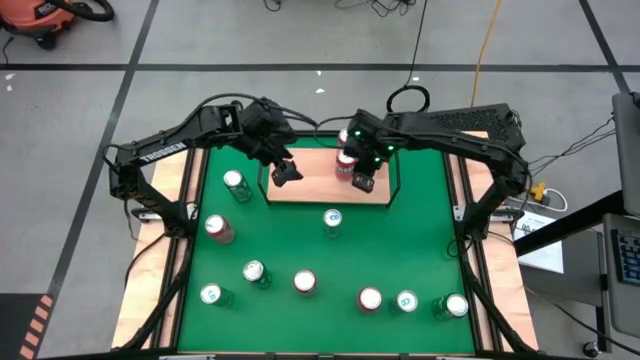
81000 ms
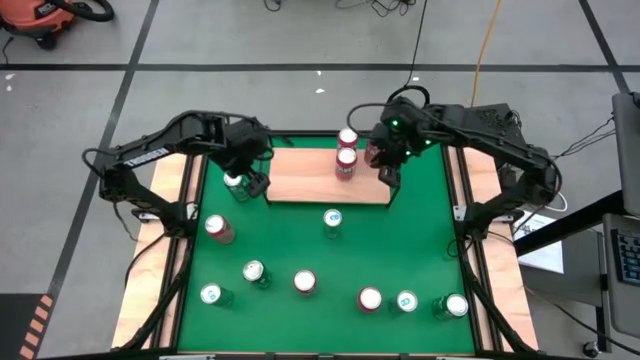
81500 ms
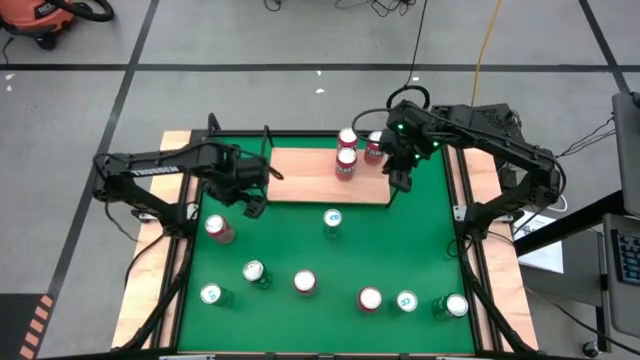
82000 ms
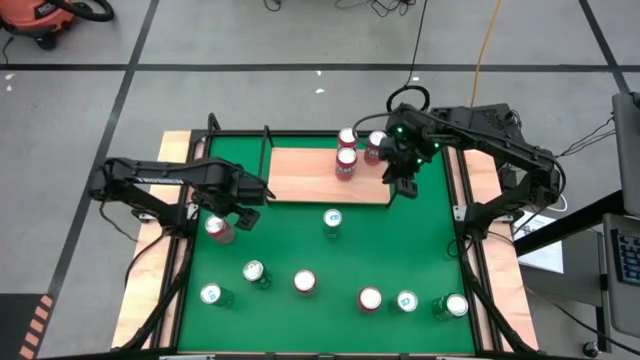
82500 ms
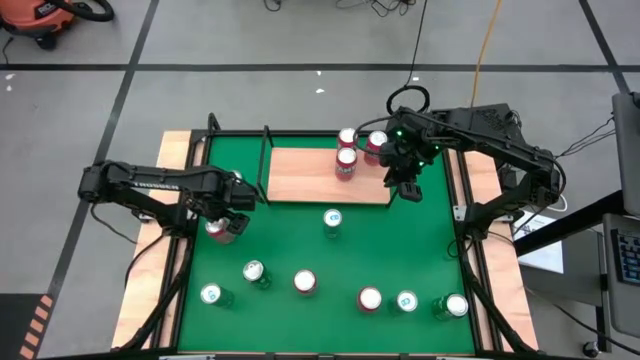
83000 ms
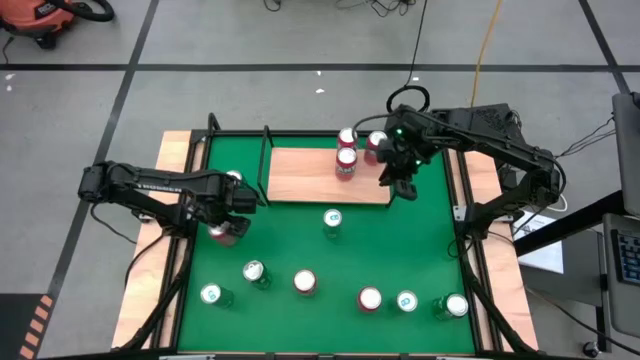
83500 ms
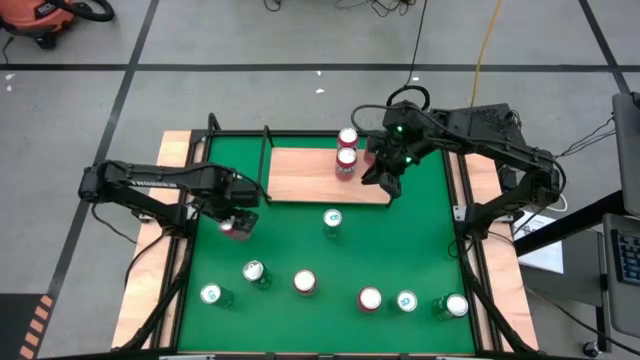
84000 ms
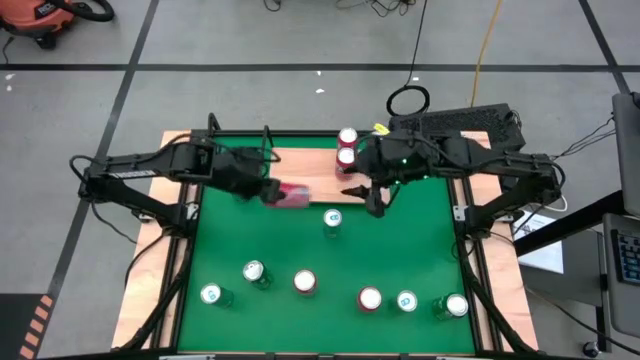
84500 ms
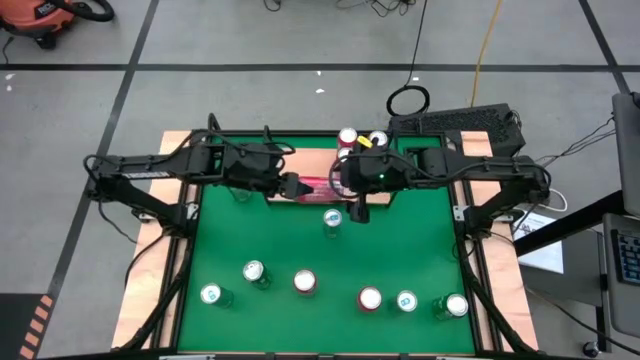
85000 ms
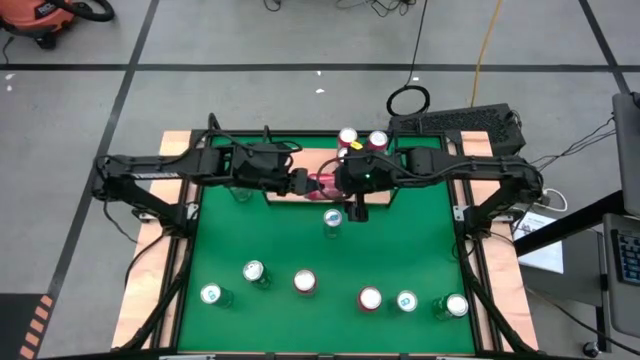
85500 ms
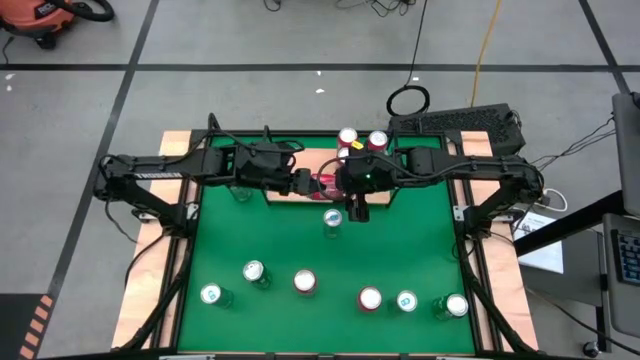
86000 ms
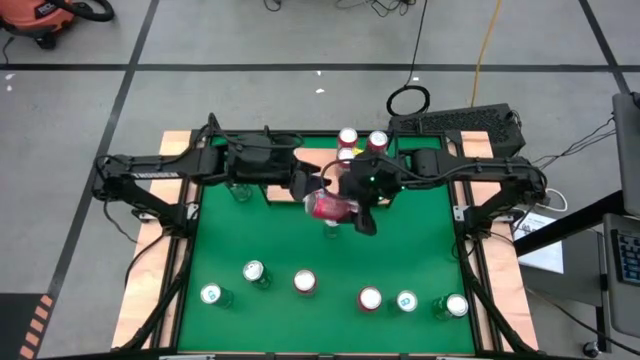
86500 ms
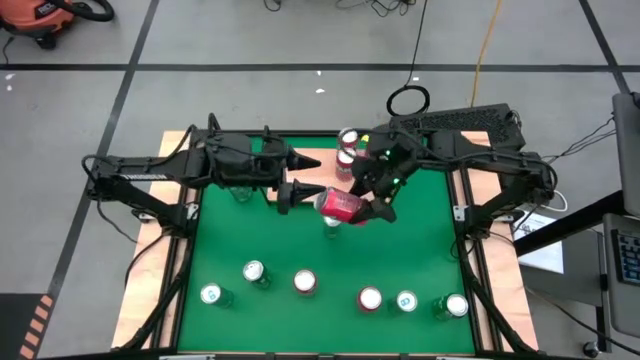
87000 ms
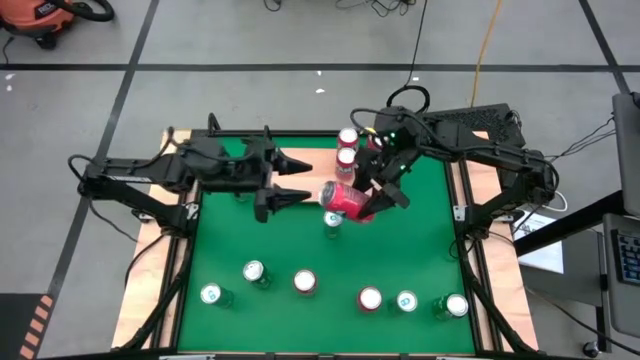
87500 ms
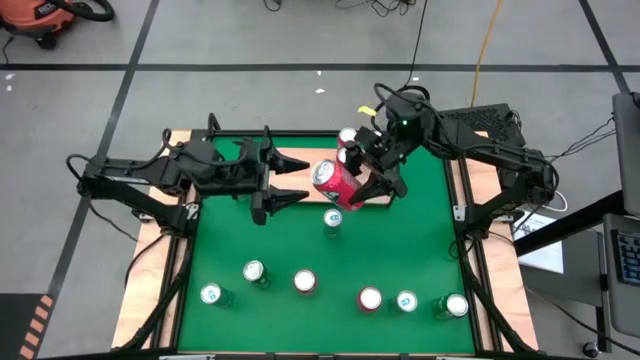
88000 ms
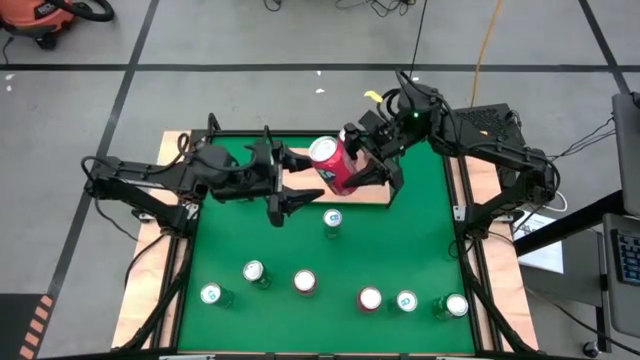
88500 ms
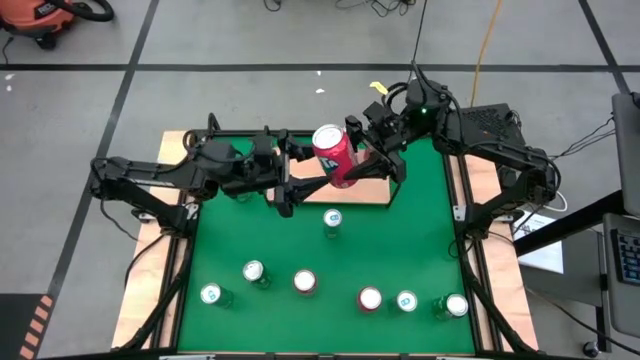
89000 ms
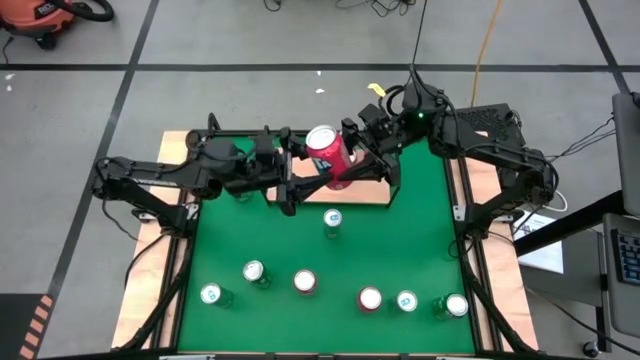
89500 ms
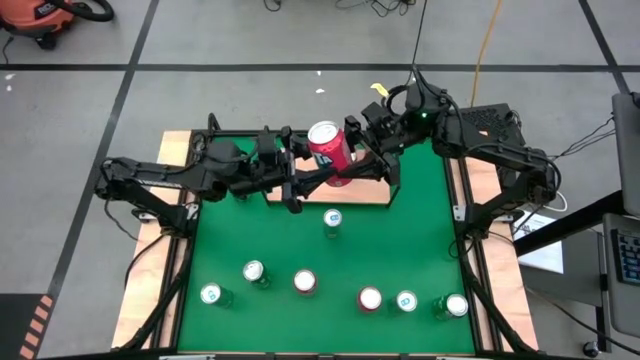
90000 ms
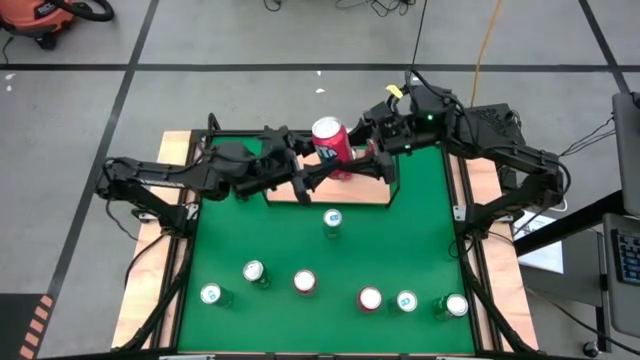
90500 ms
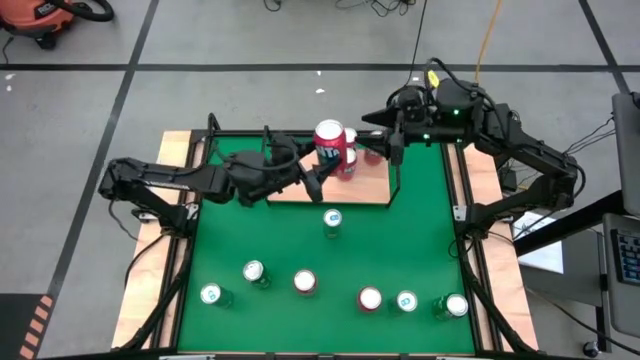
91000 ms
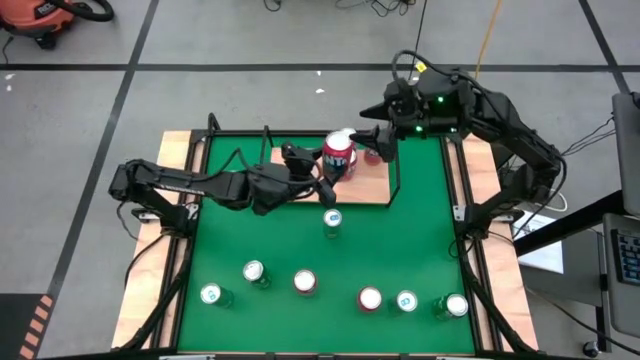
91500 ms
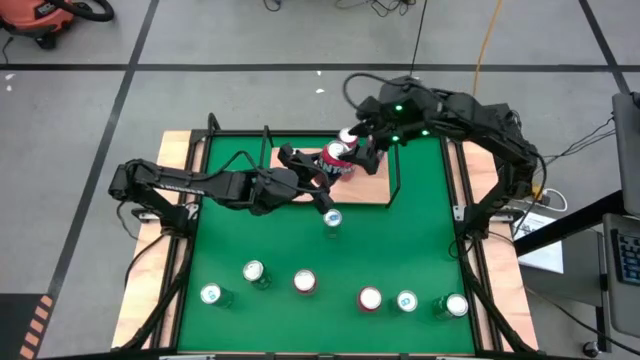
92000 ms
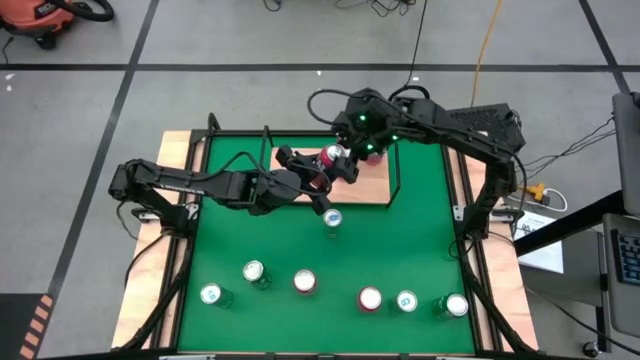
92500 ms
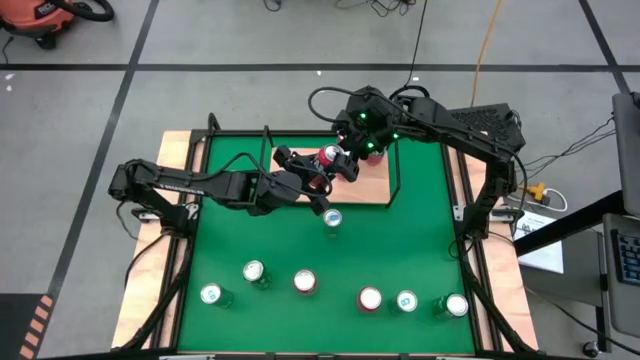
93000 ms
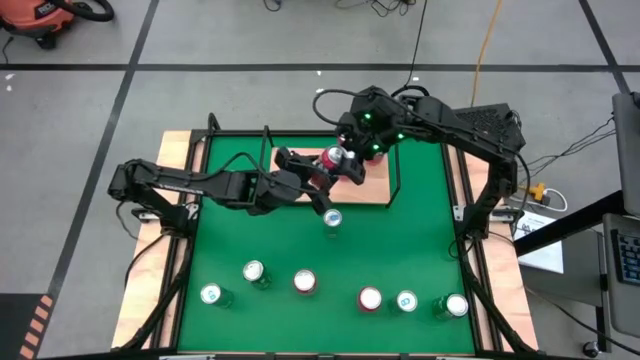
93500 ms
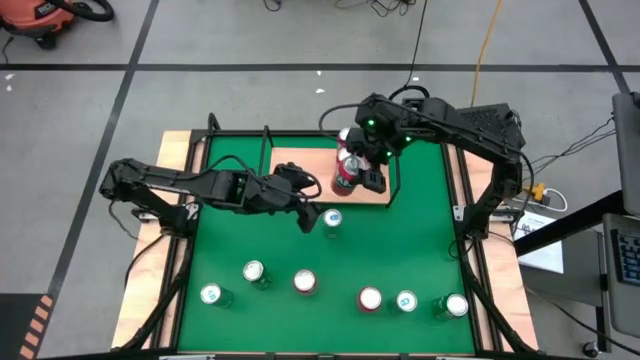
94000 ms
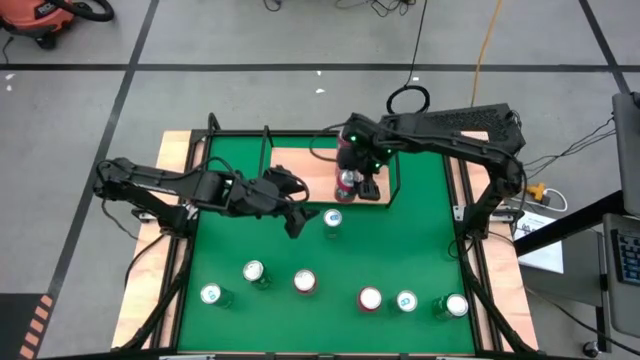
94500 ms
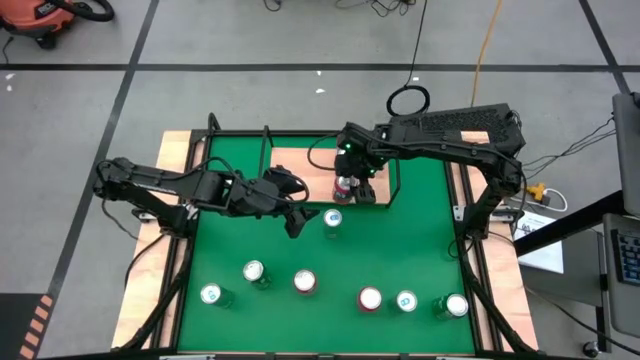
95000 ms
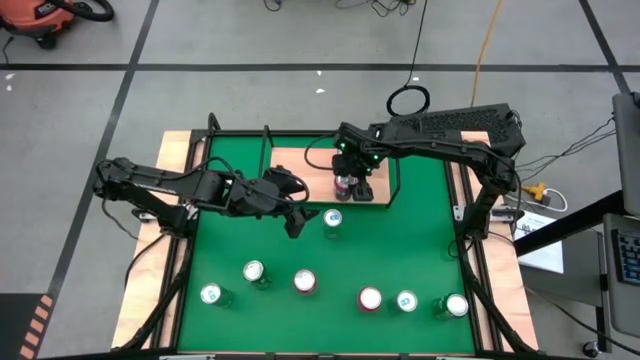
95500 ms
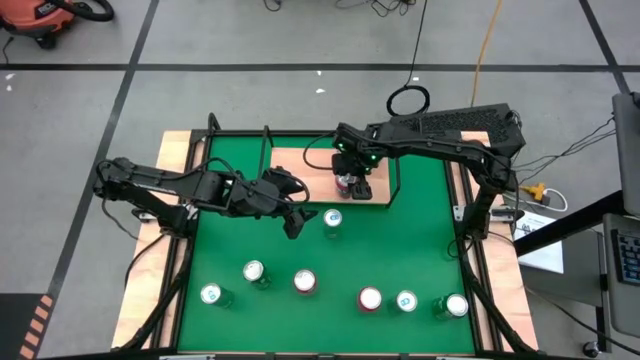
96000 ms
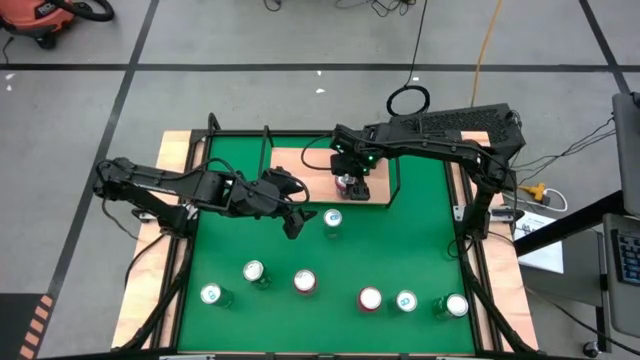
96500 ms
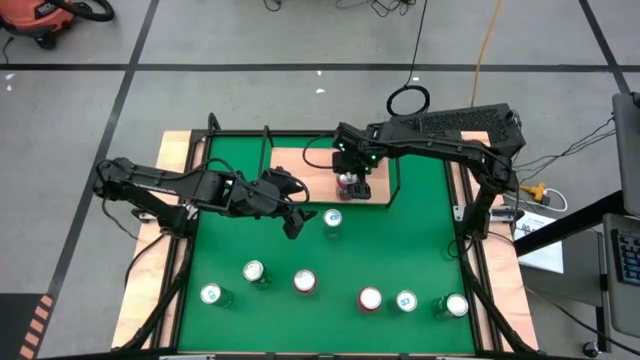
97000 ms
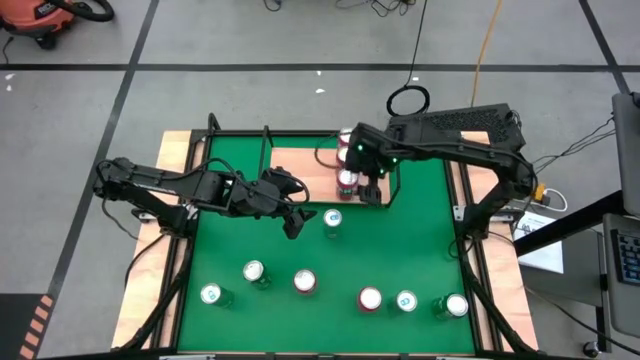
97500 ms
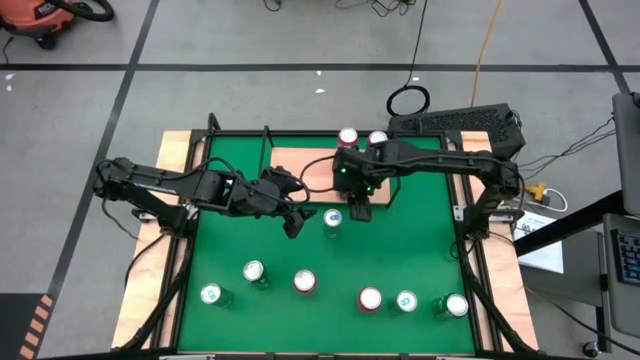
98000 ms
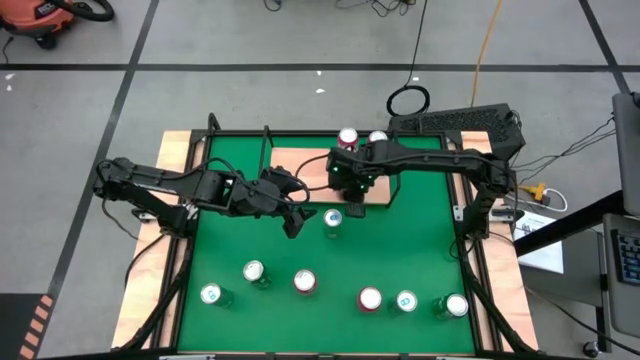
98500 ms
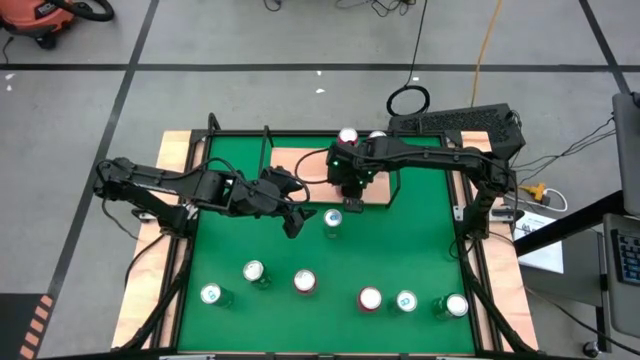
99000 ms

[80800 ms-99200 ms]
Task: Place canned beverage on shelf
Put the red soda can aligned with the other red soda can on the shelf

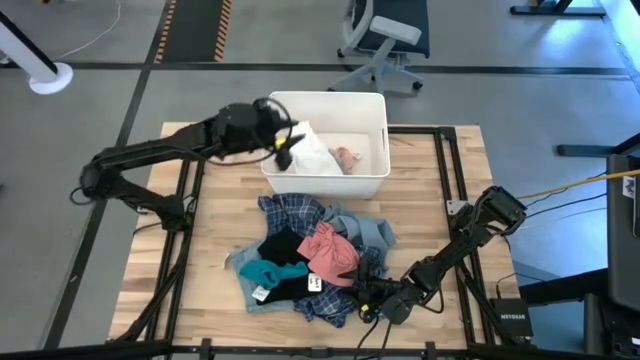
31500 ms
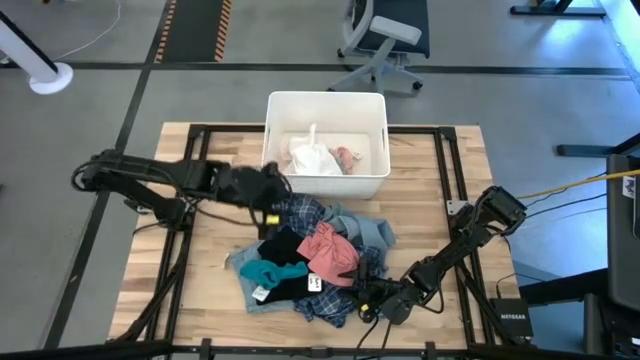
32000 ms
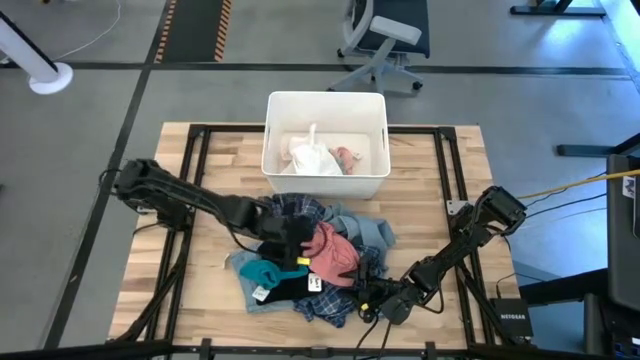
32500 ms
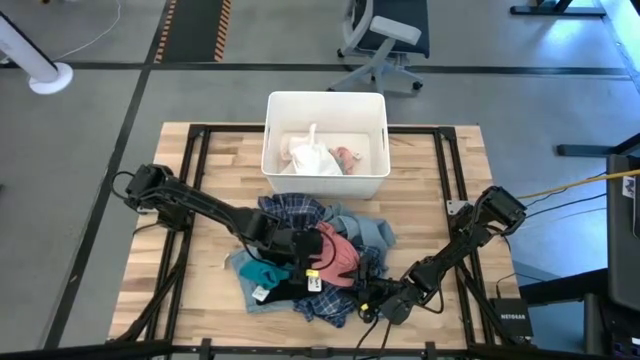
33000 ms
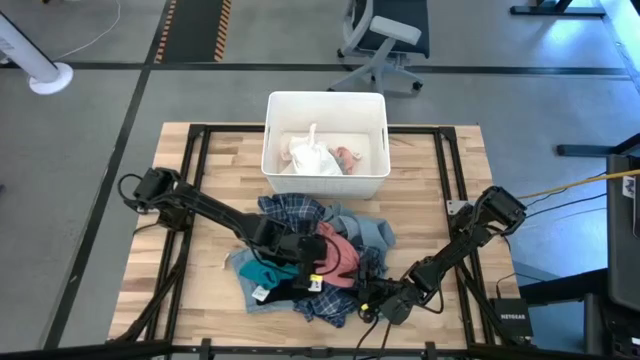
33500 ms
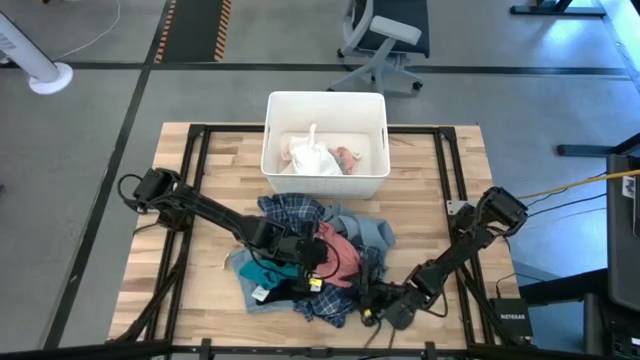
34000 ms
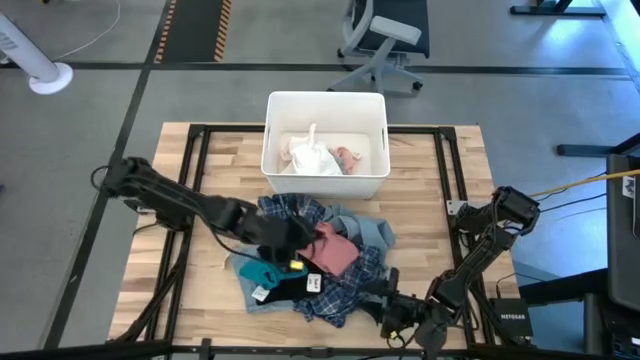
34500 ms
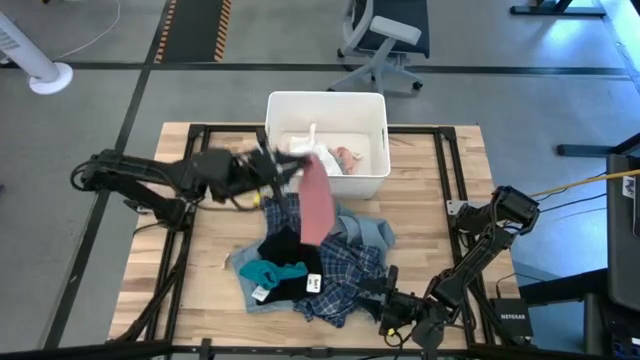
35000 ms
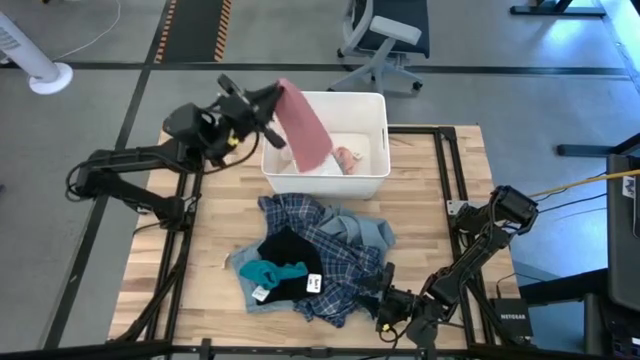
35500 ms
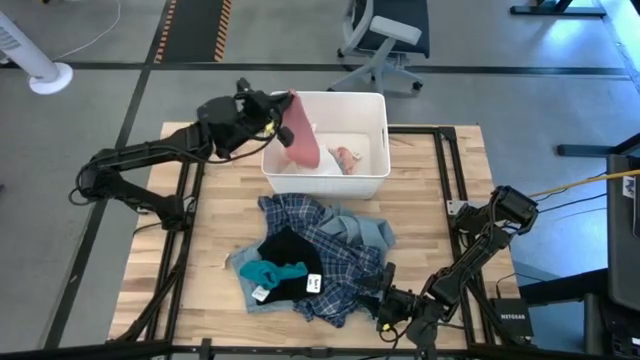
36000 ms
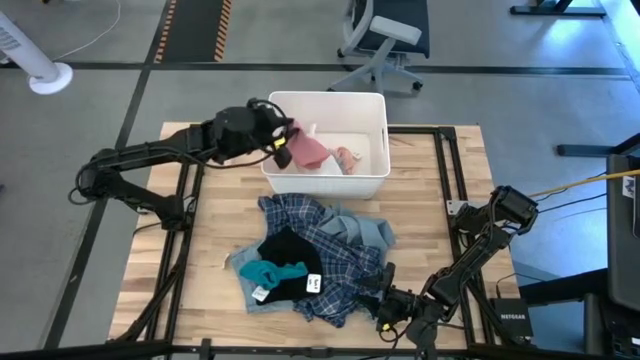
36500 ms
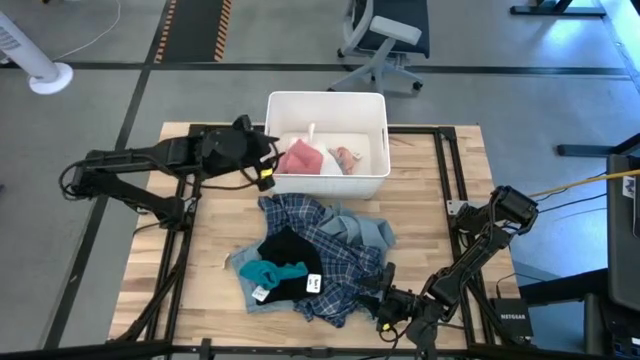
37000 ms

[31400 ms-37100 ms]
Task: Sort clothes
Put the pink boxer into the white laundry bin
